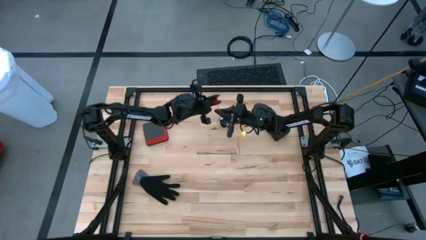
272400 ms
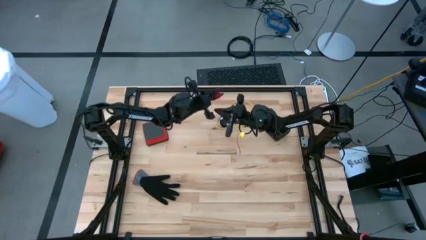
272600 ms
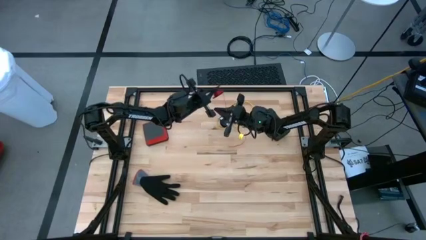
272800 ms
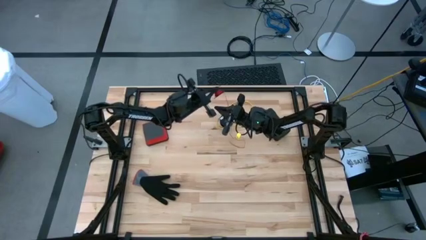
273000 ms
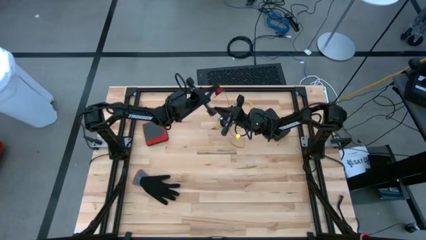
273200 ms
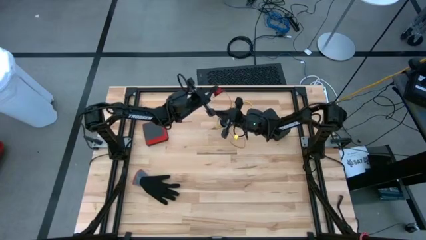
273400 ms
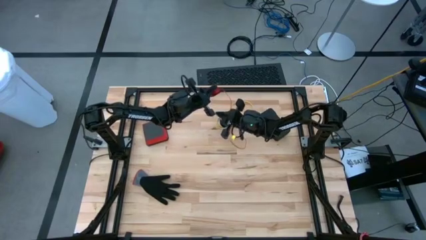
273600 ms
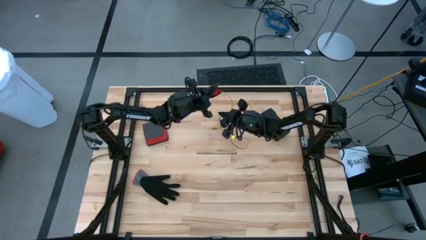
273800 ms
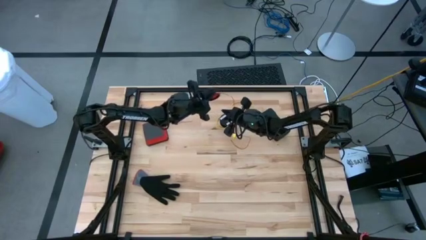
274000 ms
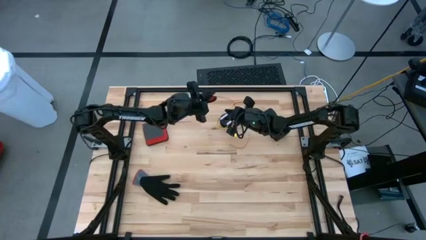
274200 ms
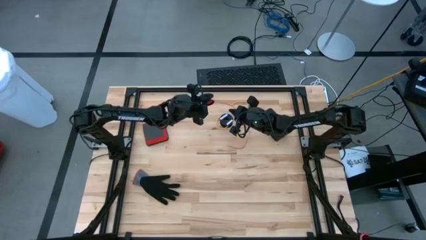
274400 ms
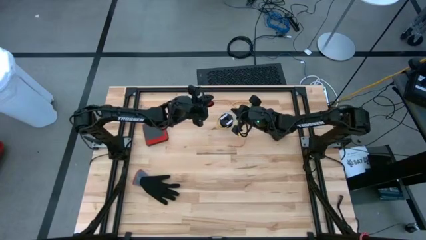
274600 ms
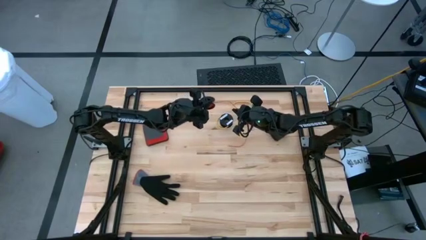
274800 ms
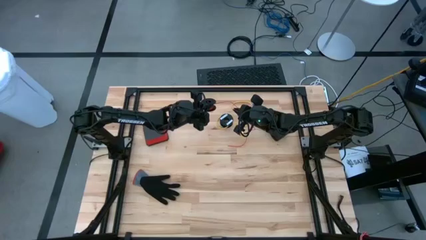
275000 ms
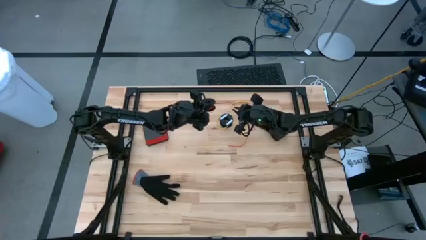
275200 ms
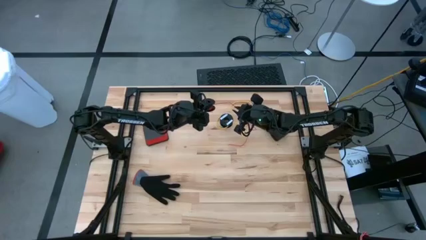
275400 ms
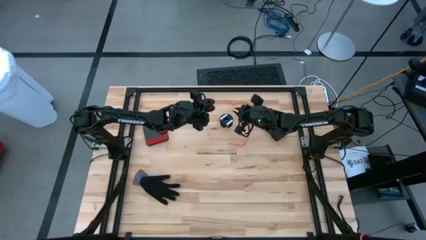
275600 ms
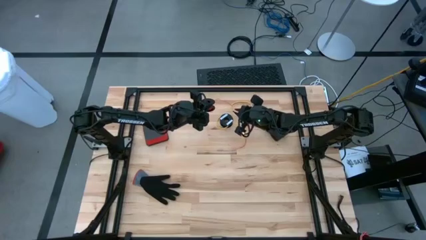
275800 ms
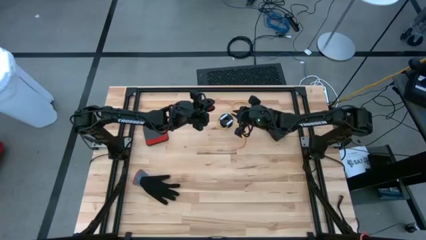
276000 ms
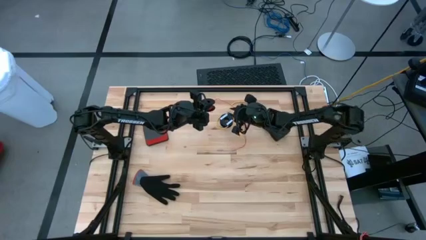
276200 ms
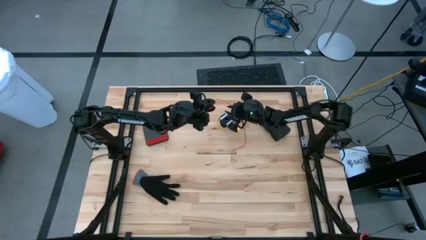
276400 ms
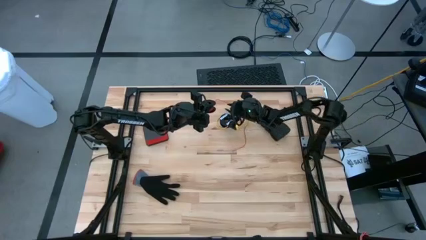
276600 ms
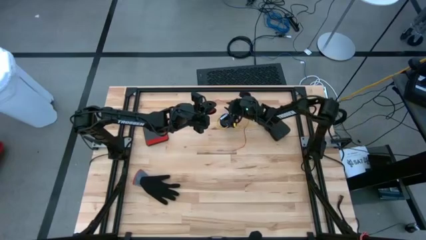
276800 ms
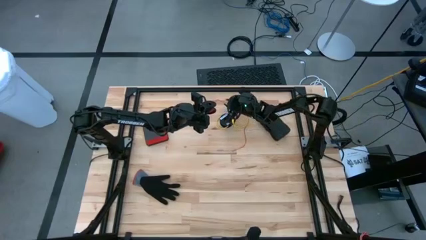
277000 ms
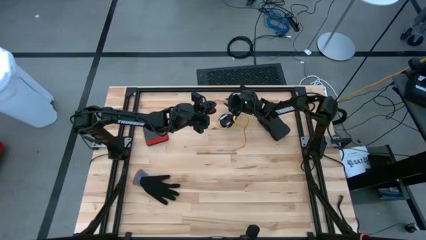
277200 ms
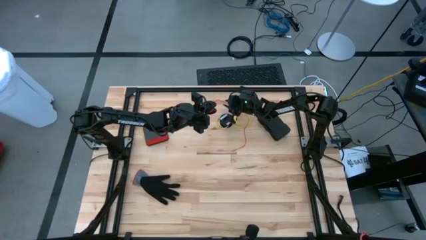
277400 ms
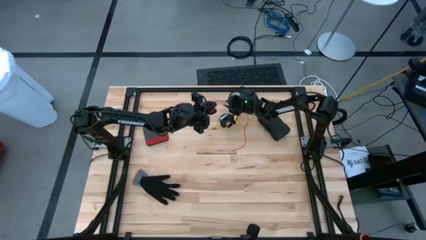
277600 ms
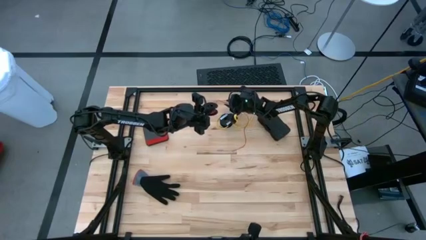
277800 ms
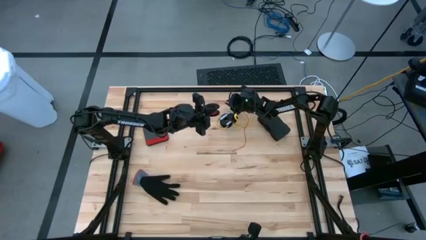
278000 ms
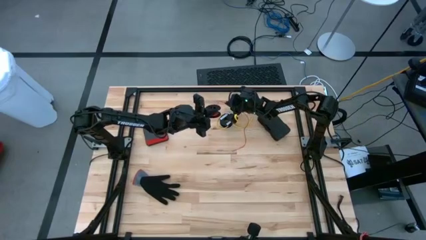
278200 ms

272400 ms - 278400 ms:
Task: Coil cords
Coil the red wire into the spool

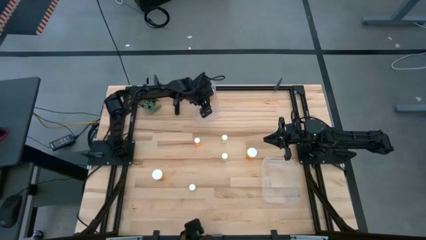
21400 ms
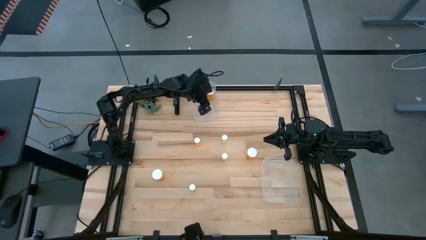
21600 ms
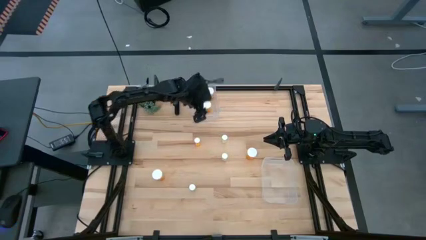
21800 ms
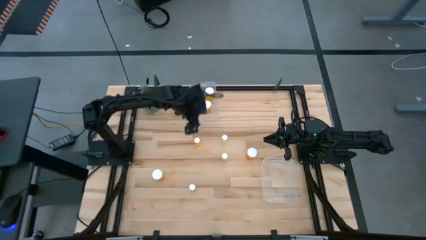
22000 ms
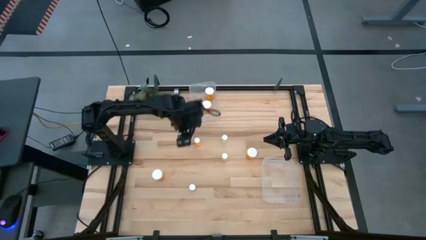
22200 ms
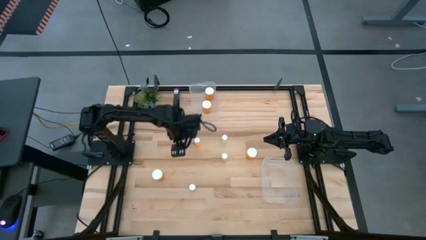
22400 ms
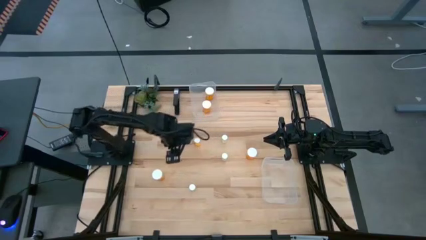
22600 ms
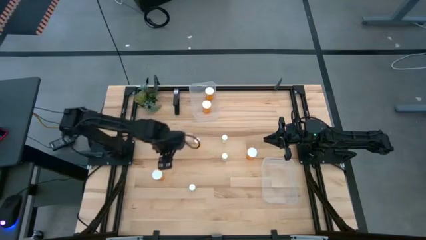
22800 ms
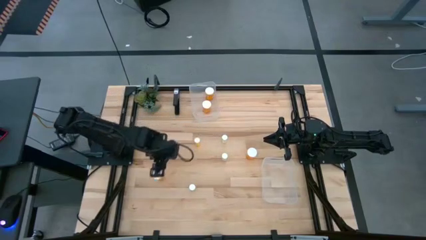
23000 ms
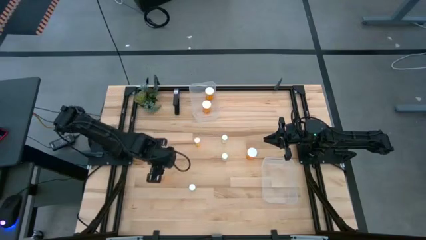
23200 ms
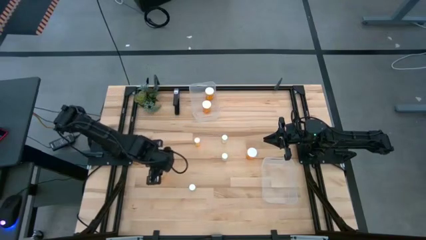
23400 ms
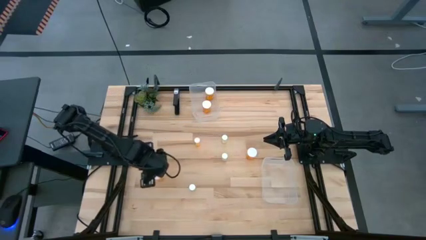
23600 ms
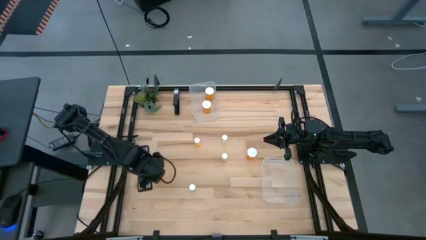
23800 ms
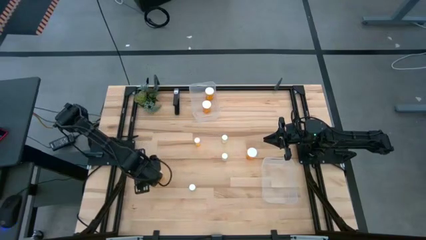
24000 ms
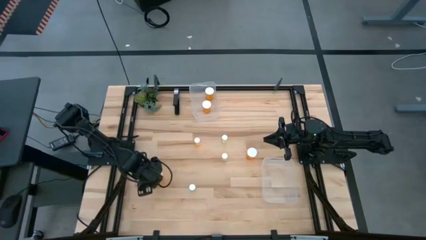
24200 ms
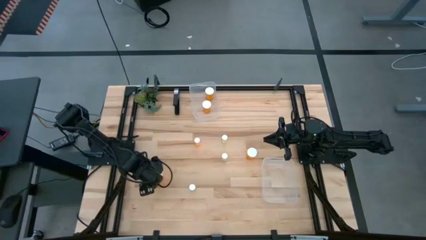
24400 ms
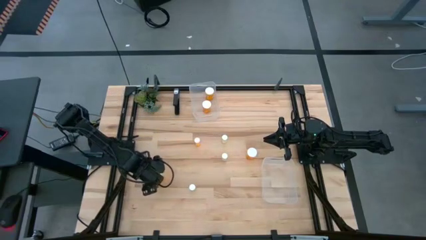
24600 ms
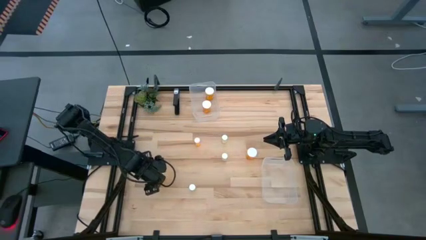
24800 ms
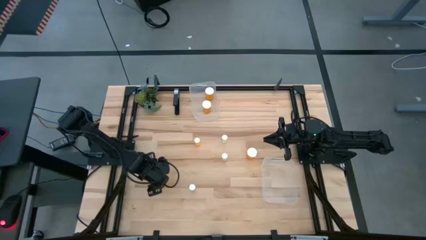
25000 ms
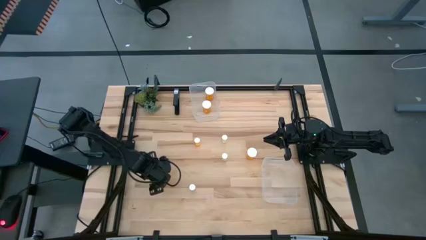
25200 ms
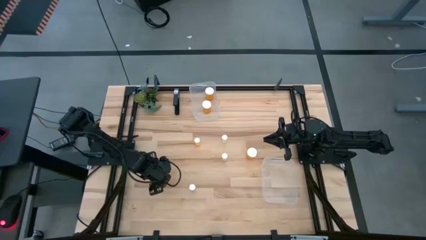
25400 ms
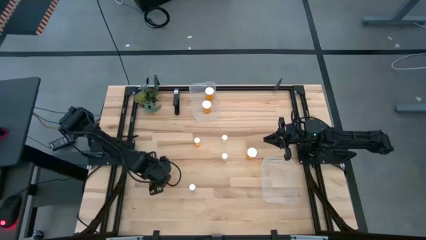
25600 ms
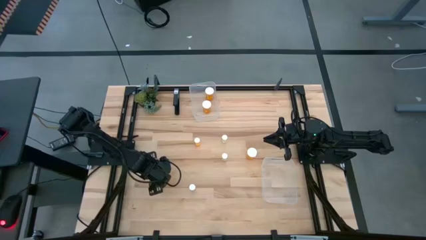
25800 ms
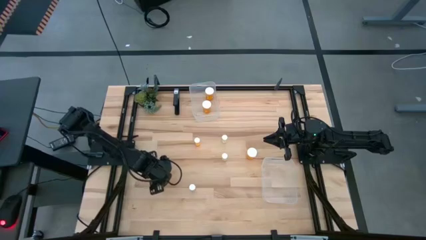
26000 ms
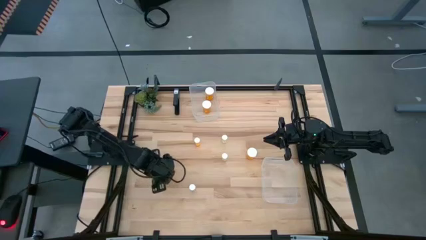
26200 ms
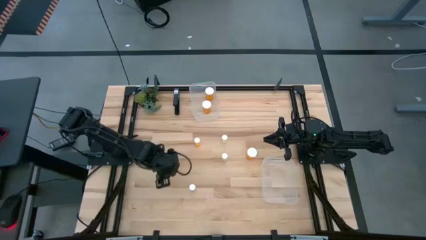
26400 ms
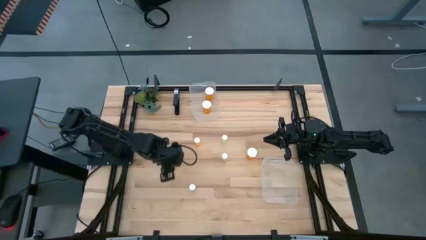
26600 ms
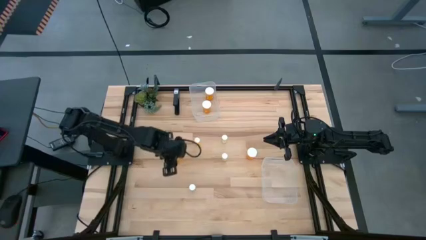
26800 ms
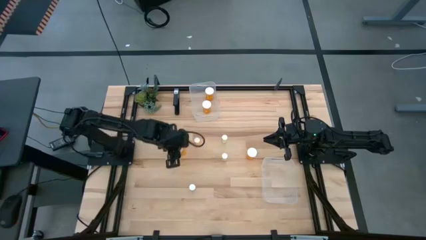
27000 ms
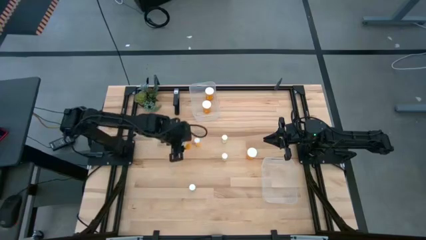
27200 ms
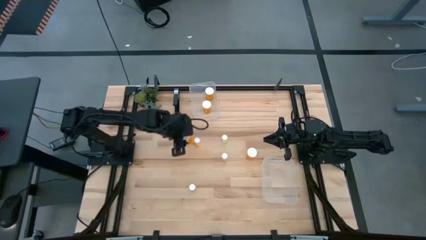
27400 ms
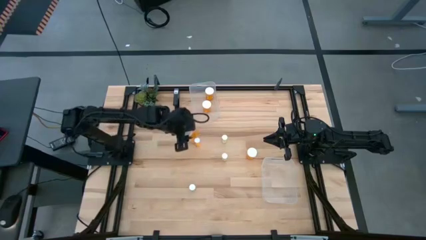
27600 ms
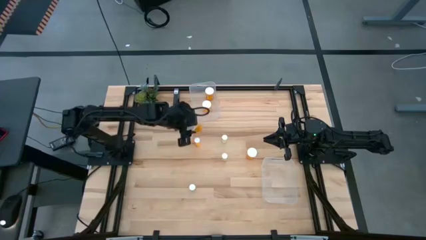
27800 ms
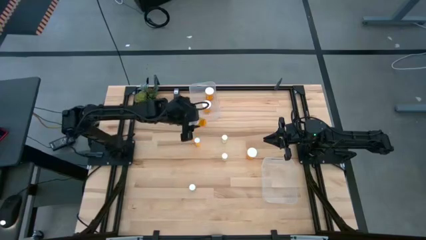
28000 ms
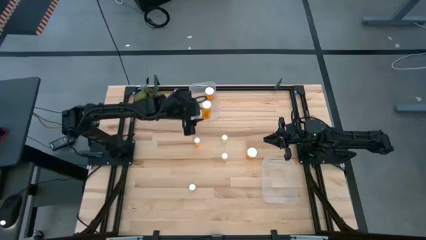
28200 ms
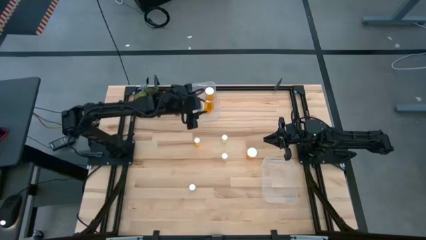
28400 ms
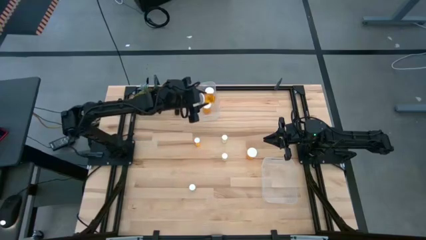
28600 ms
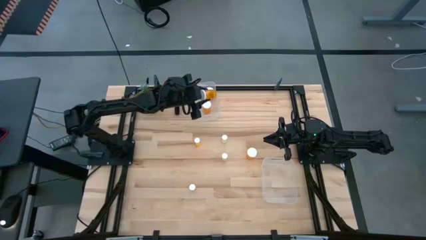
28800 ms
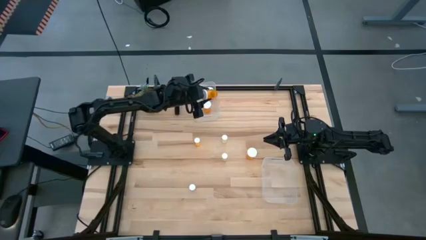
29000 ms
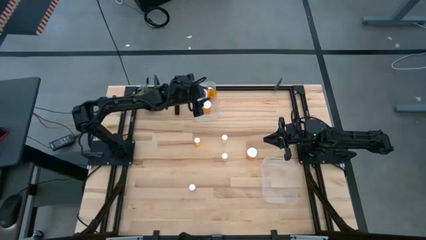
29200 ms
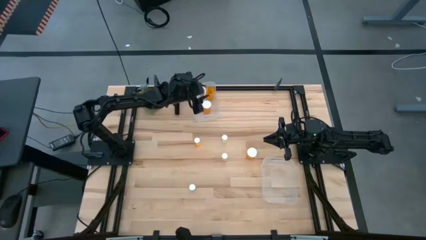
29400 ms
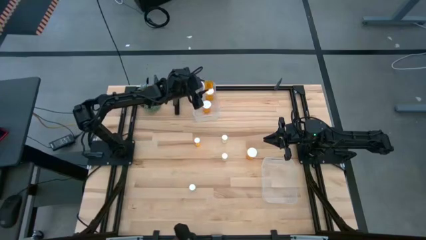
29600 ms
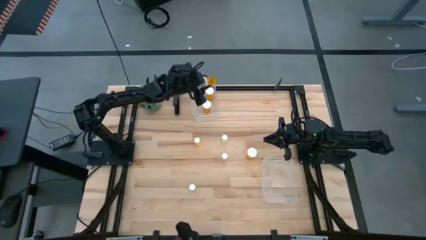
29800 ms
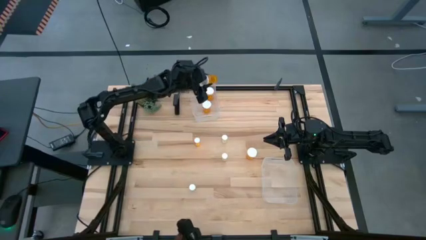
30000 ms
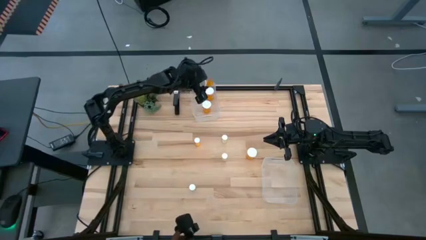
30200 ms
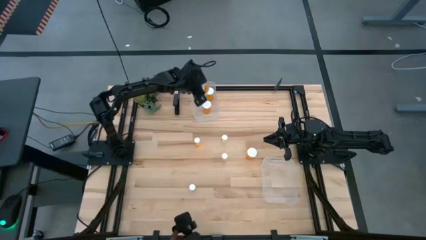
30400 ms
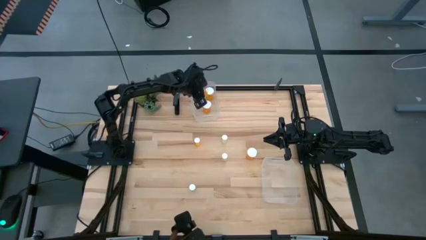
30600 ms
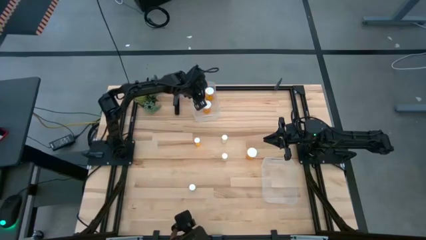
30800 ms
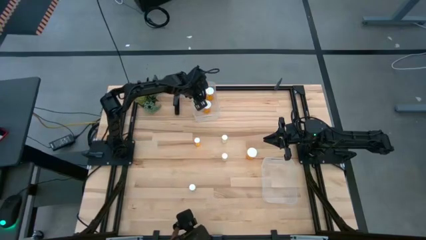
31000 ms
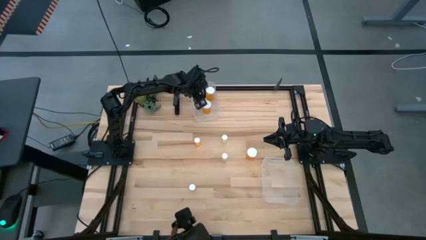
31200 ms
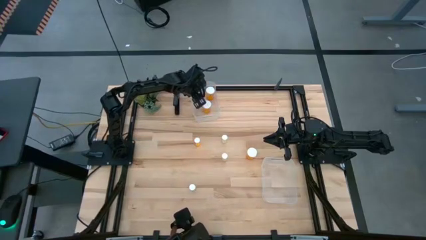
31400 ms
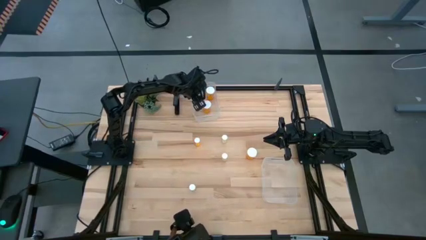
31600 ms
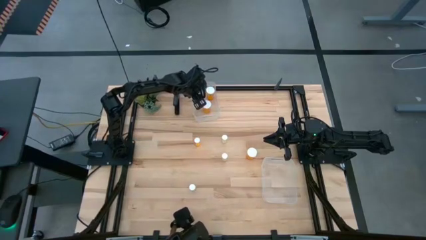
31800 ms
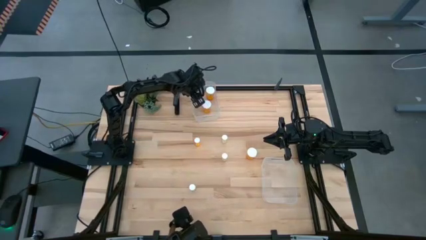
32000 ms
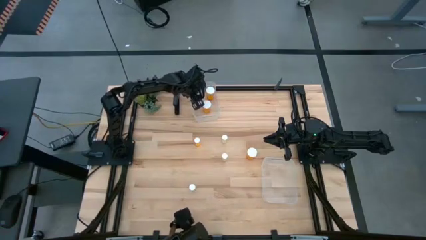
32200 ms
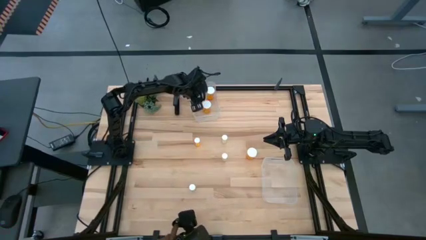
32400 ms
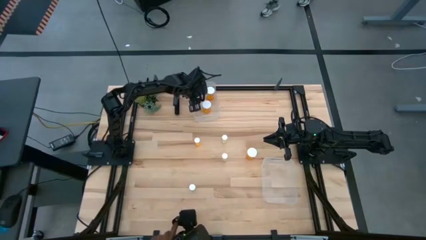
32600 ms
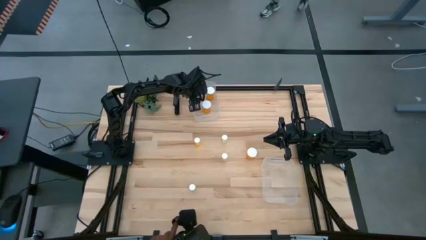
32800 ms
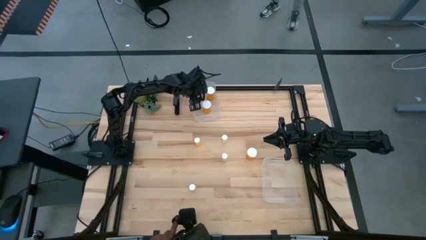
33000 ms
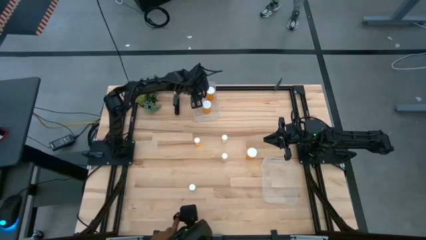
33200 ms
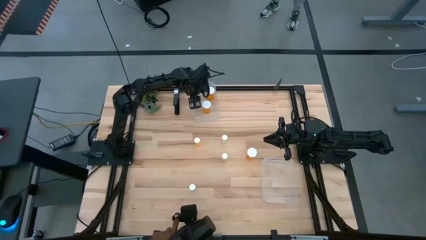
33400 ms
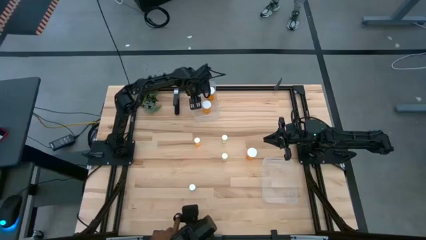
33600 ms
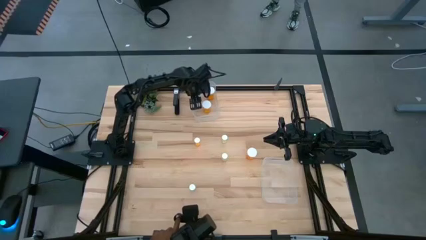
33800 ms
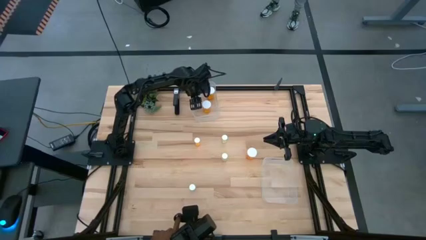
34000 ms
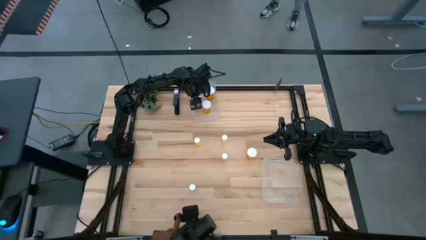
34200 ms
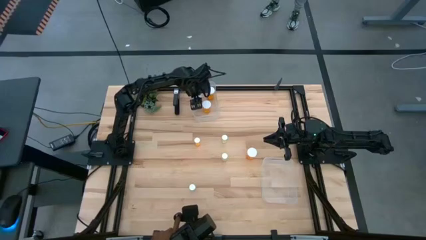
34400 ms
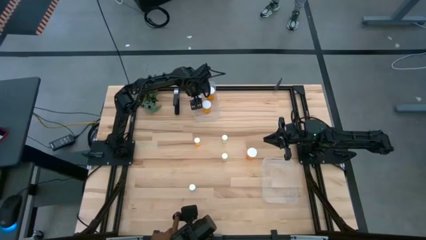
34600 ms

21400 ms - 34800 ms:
Task: Pick and place medicine bottles into bin by pill shape (circle, oval)
Put the orange capsule bottle into the top transparent bin
